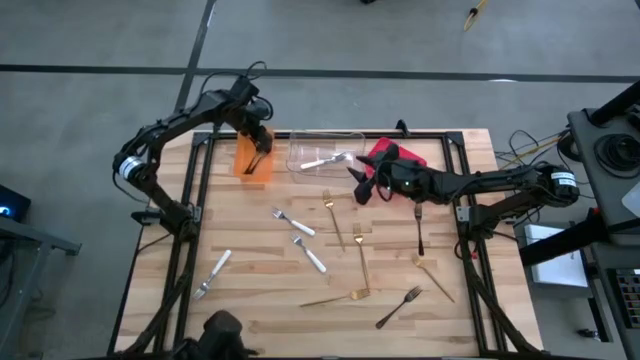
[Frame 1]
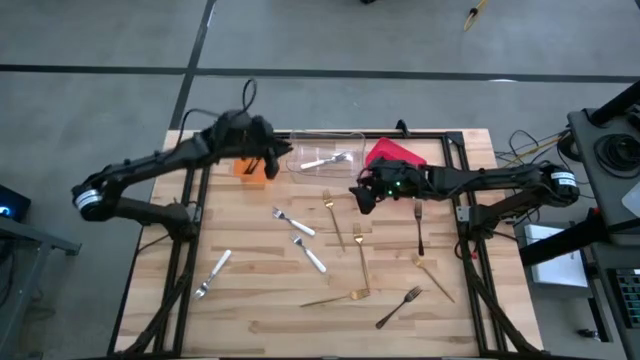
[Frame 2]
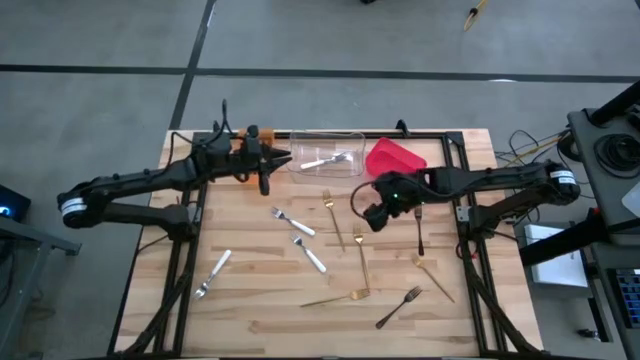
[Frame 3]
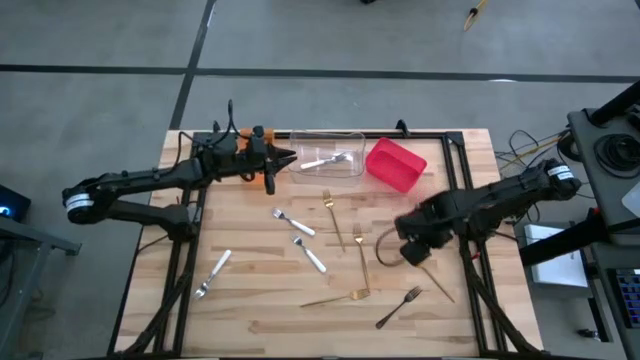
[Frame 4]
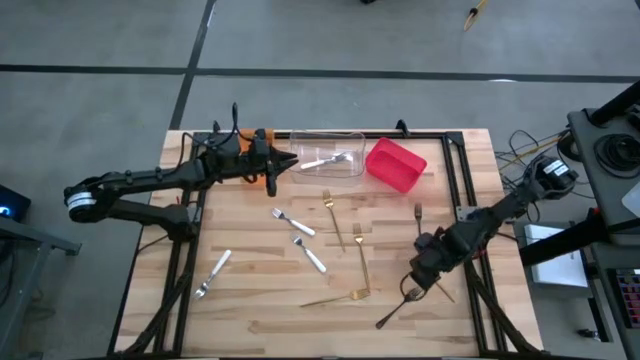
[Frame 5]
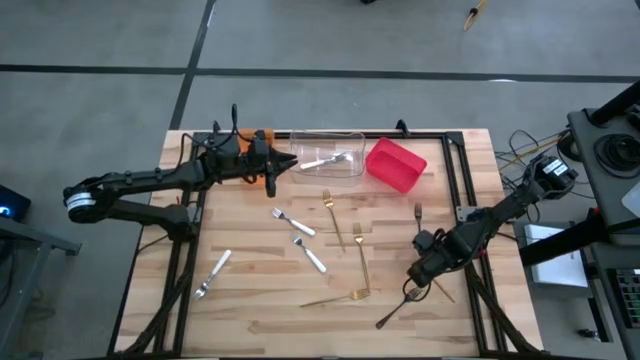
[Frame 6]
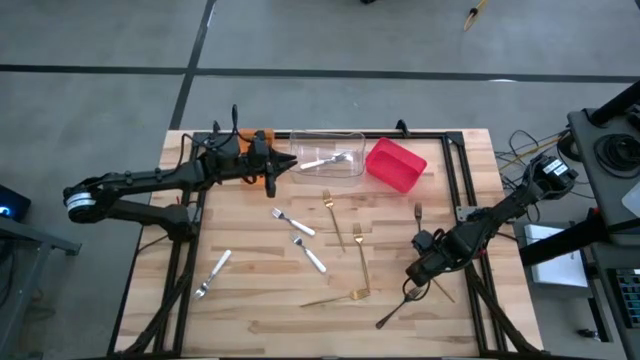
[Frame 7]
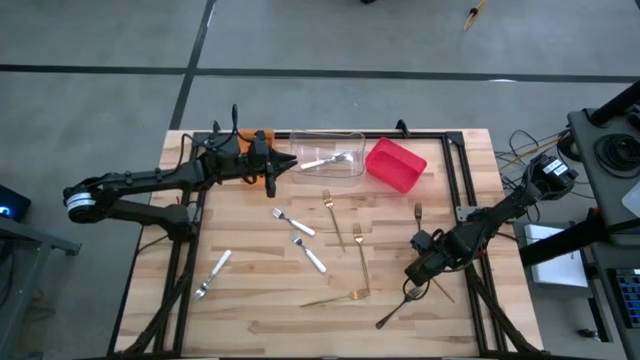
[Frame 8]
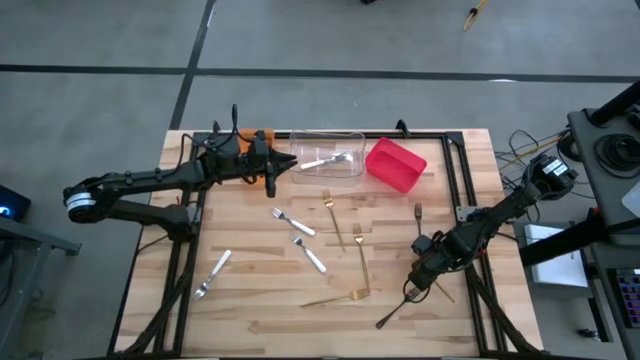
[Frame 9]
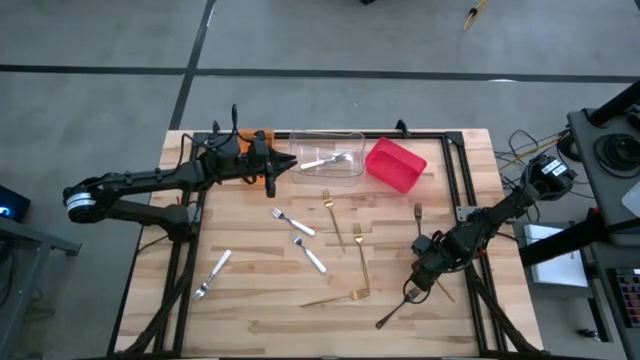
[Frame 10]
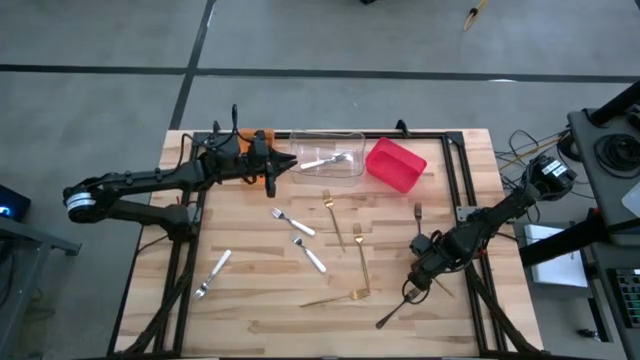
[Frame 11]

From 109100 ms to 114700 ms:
Task: Sort silverware by color (type)
Put the gold fork into the red bin

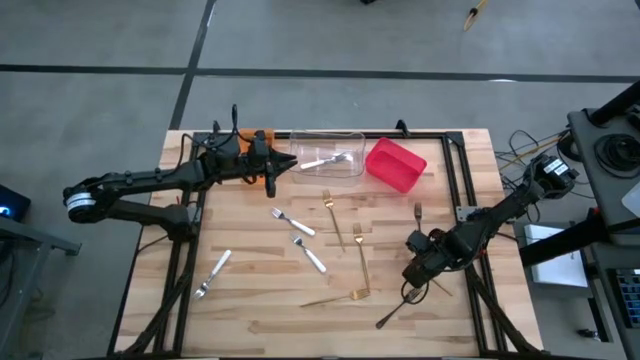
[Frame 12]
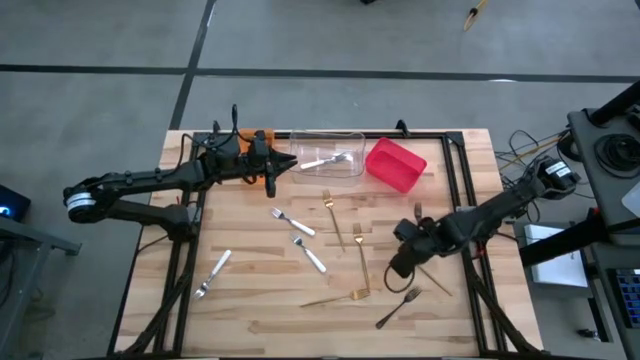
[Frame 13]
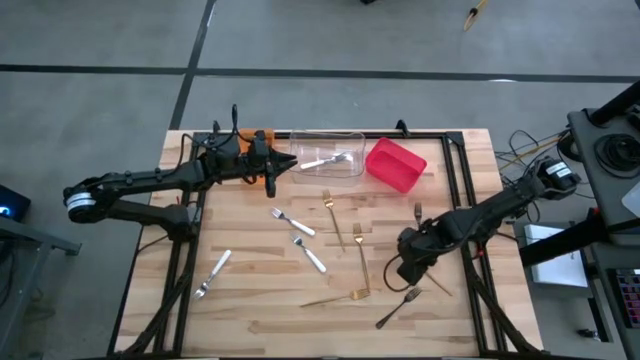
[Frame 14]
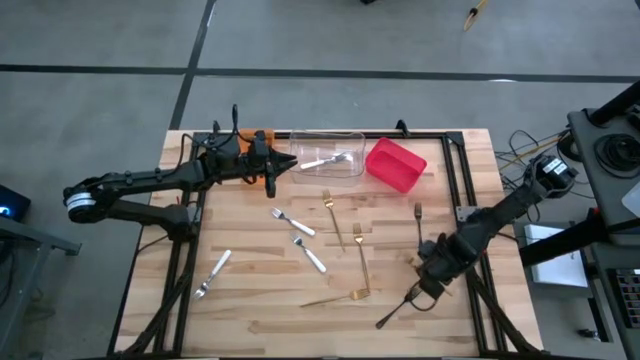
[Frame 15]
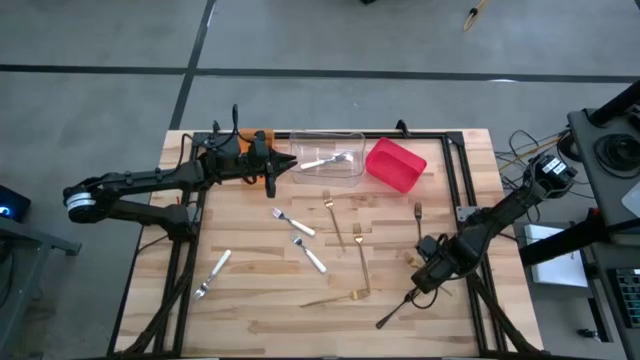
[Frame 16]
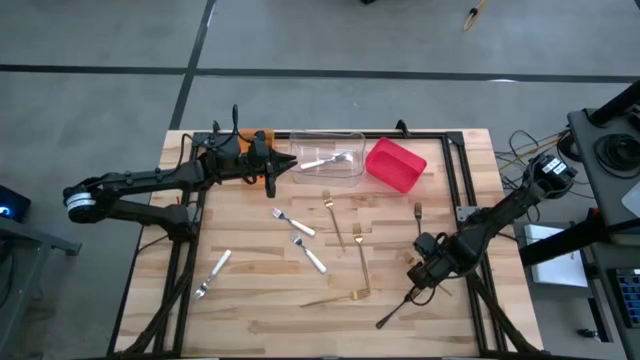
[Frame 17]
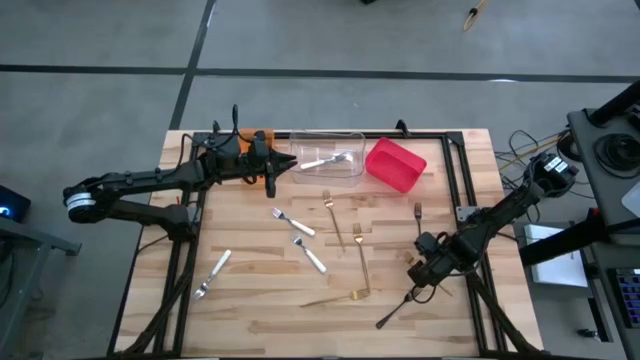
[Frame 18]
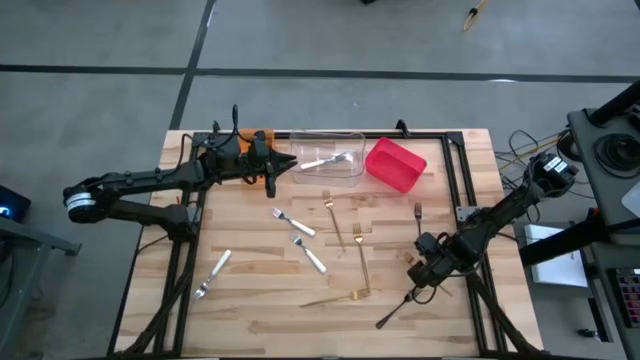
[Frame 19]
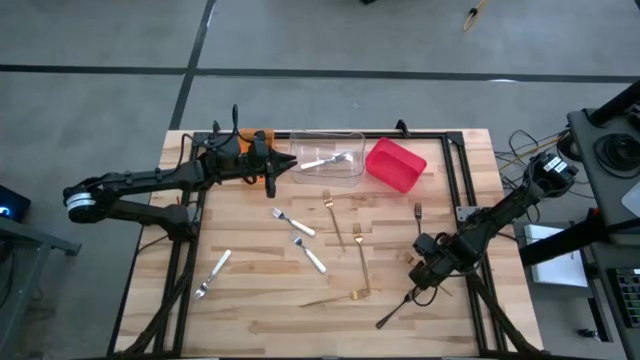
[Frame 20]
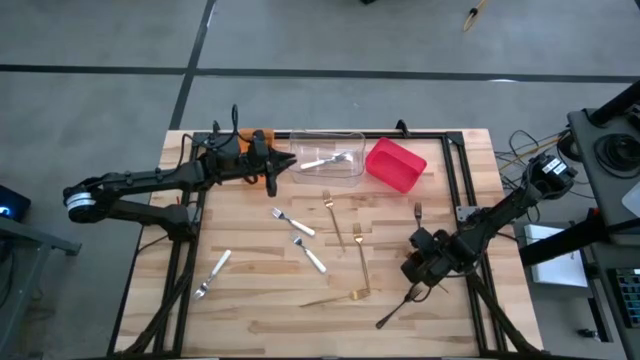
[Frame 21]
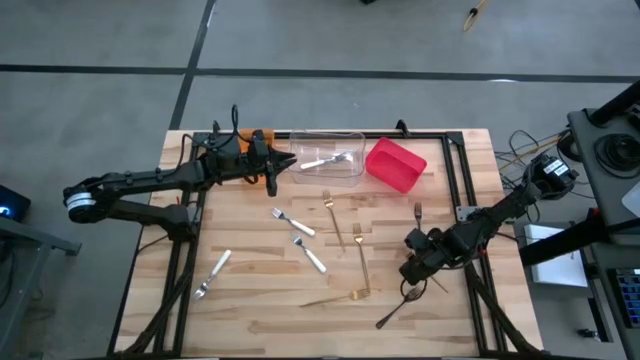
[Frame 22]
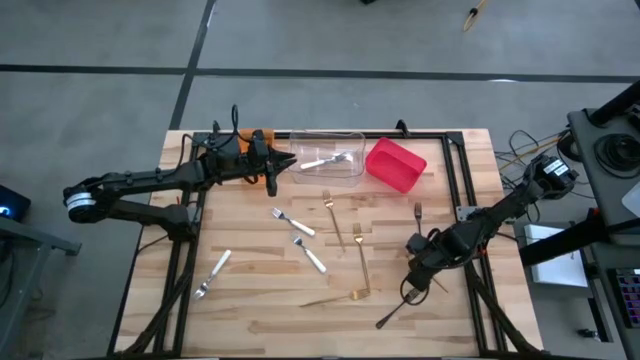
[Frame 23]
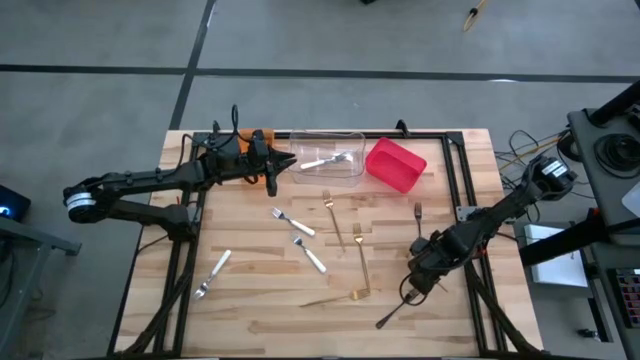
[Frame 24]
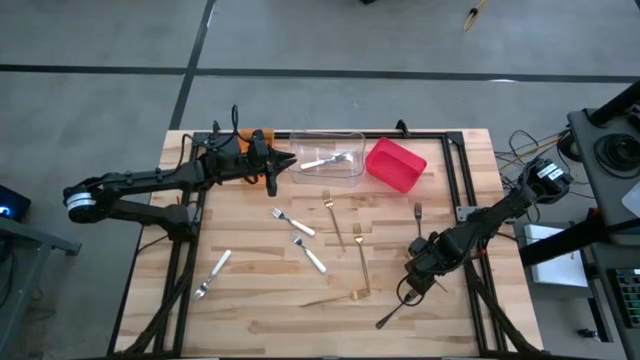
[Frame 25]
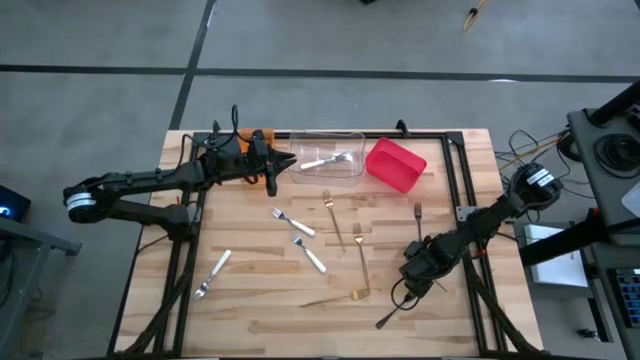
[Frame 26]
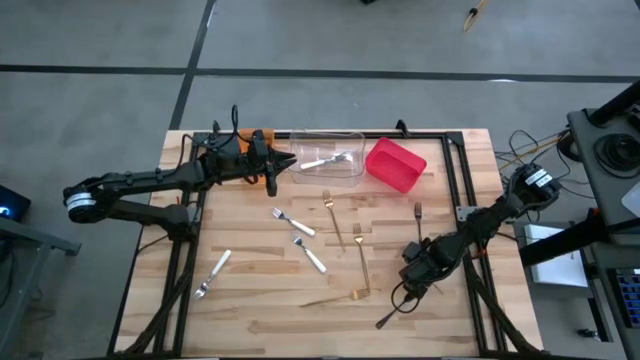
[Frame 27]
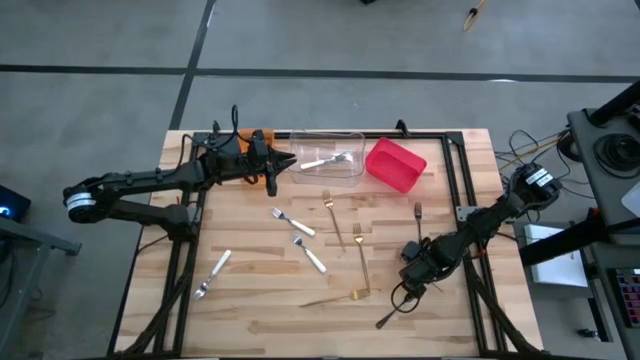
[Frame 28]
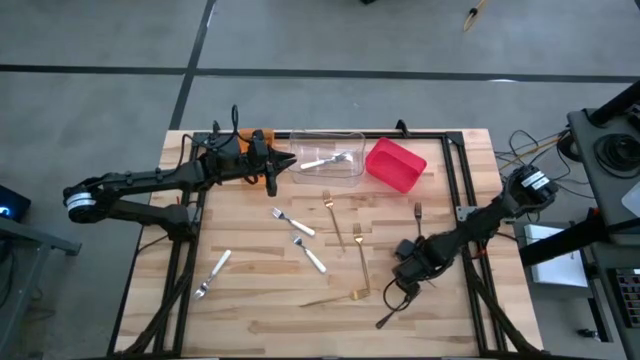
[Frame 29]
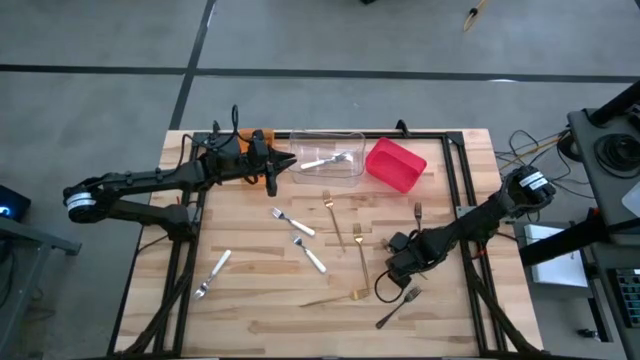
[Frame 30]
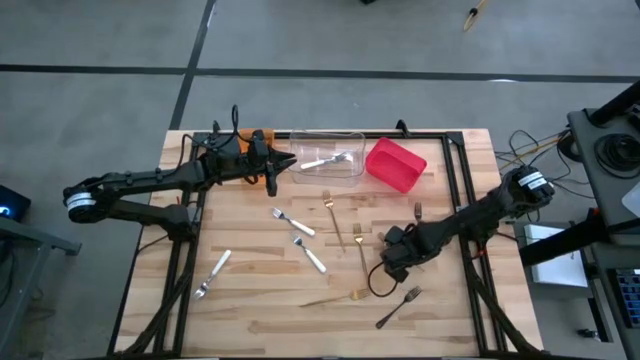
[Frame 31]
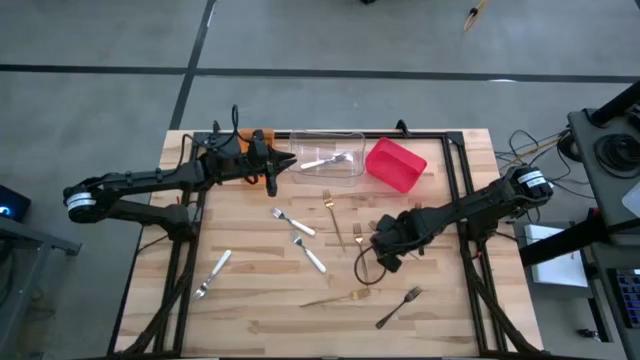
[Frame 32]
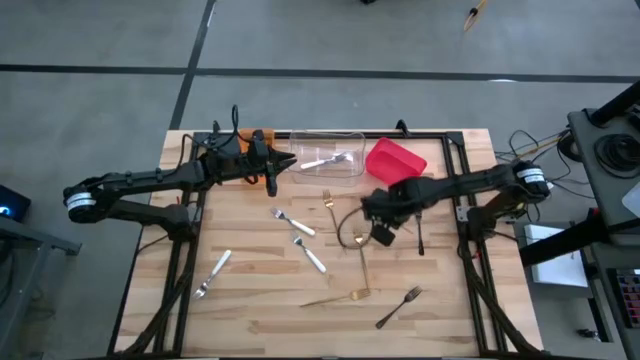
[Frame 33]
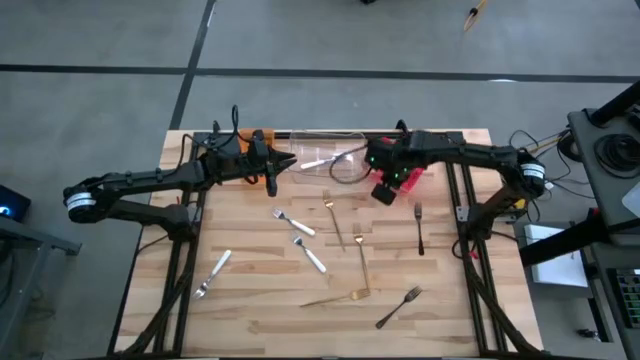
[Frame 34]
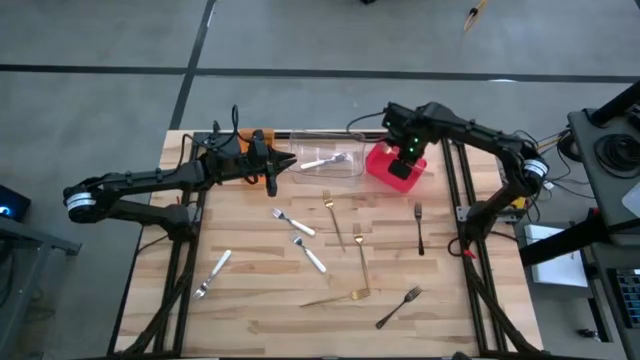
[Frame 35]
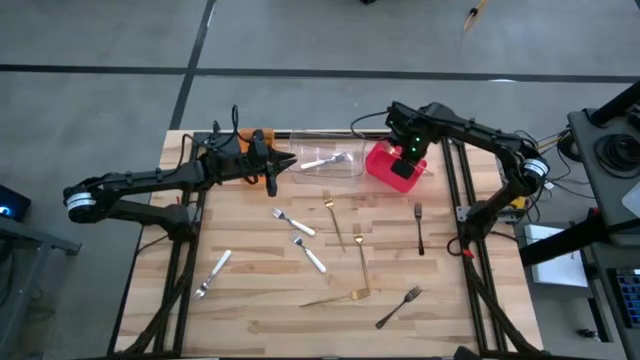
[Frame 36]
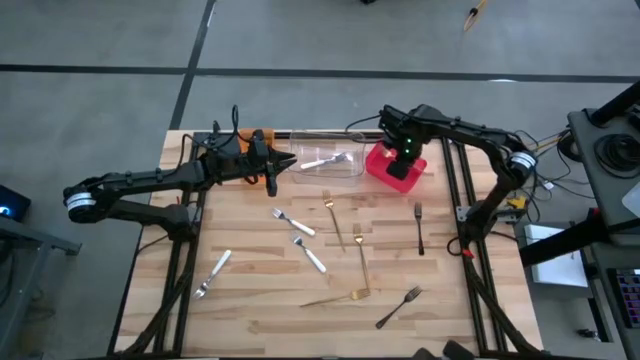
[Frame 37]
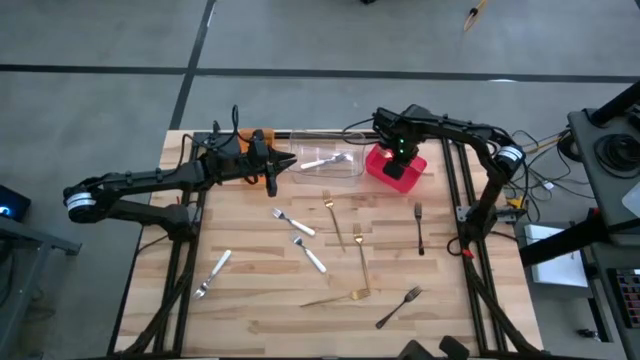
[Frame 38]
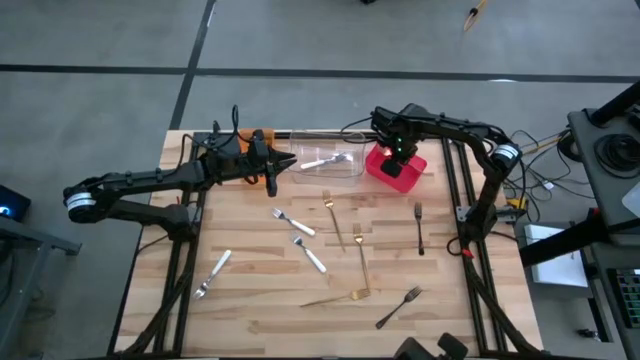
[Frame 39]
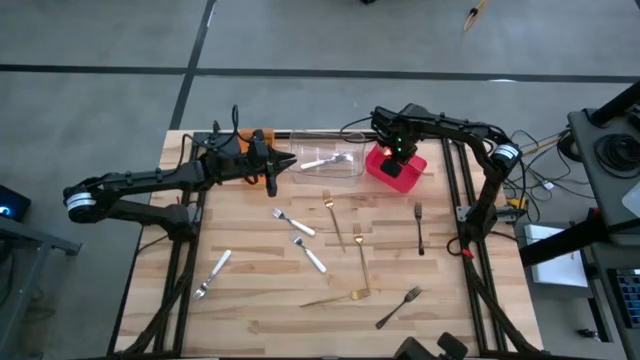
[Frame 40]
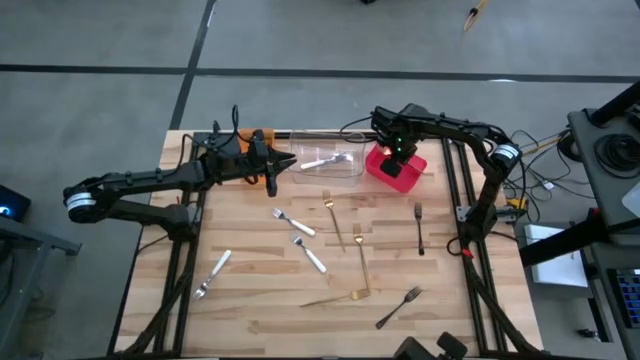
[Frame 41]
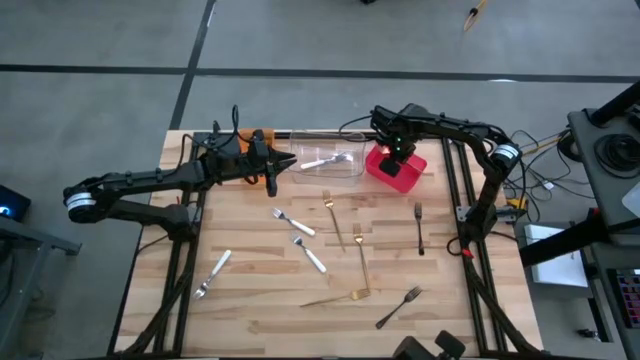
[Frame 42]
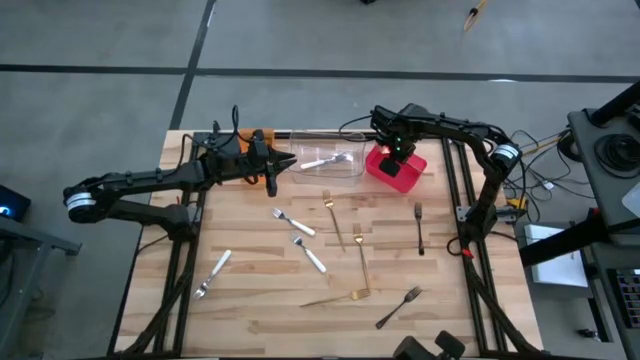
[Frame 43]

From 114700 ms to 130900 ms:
Put the gold fork into the red bin
